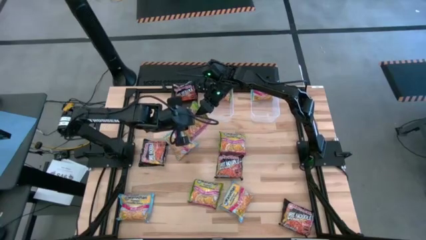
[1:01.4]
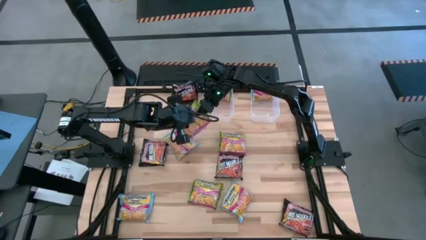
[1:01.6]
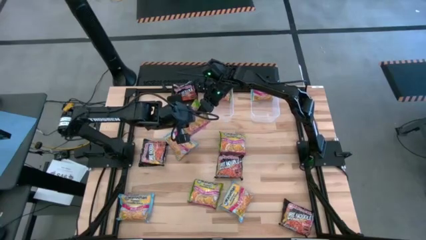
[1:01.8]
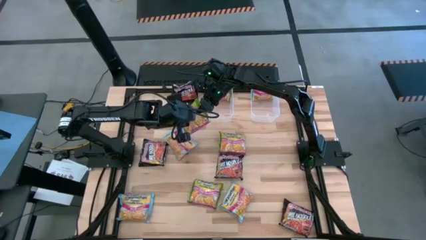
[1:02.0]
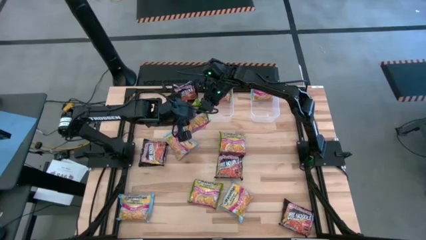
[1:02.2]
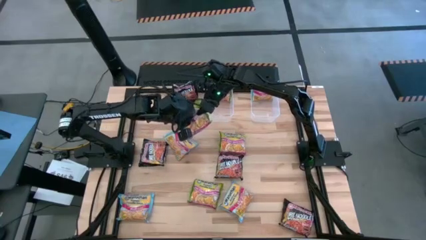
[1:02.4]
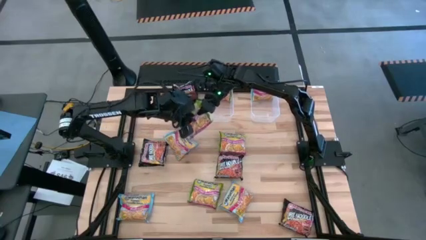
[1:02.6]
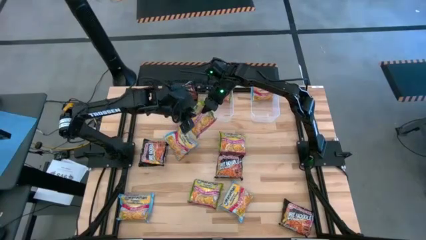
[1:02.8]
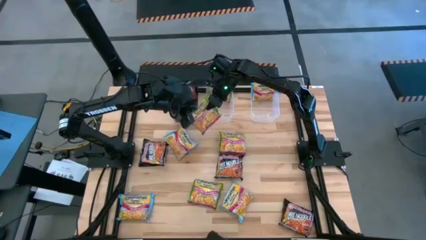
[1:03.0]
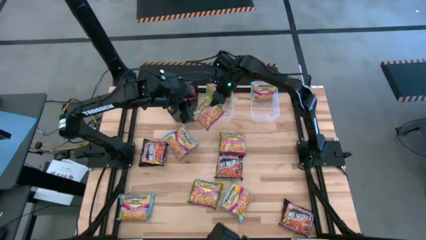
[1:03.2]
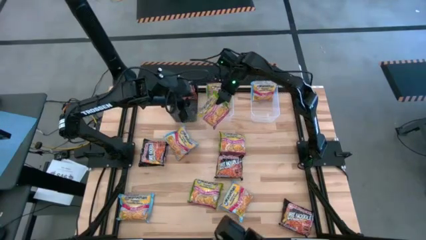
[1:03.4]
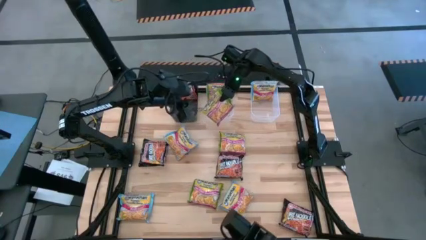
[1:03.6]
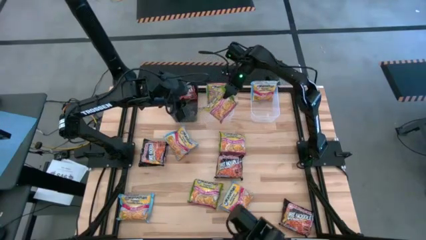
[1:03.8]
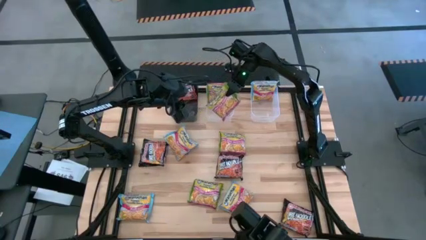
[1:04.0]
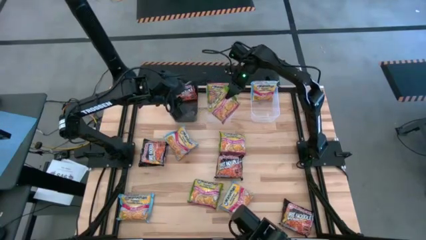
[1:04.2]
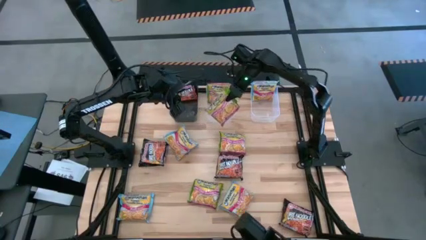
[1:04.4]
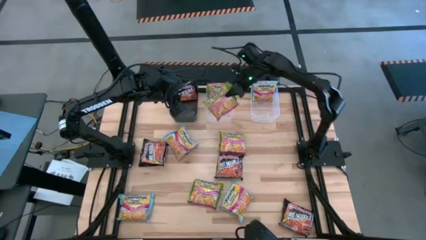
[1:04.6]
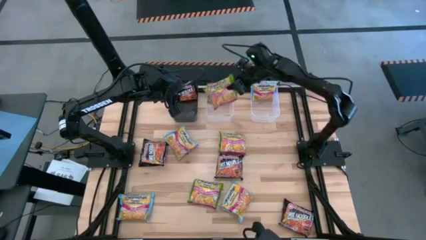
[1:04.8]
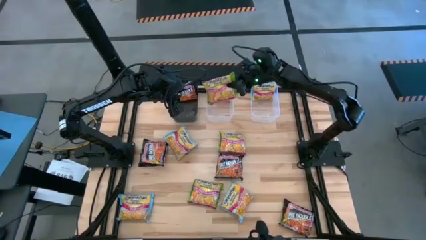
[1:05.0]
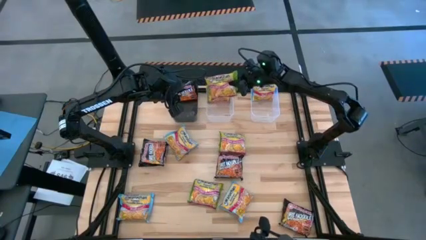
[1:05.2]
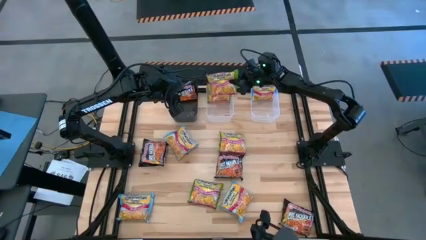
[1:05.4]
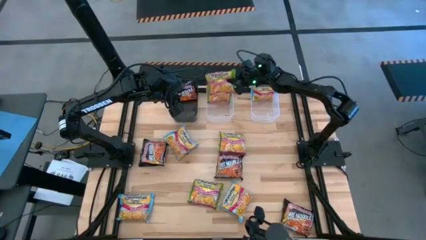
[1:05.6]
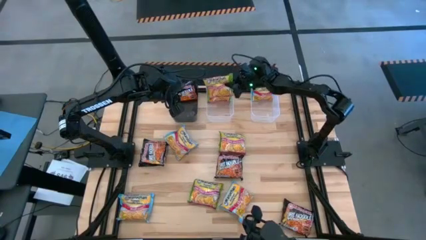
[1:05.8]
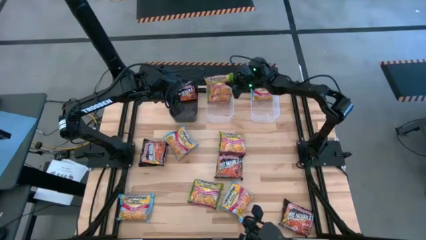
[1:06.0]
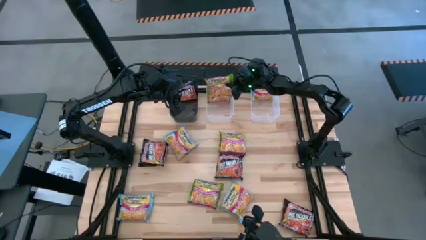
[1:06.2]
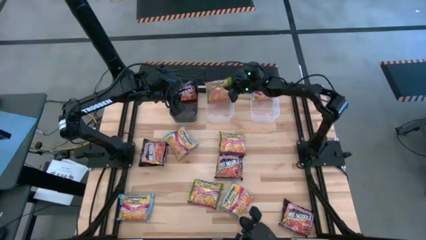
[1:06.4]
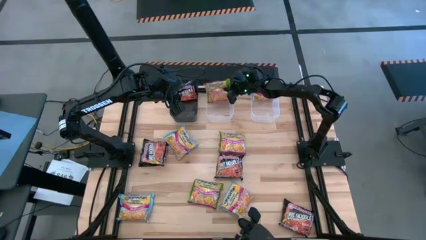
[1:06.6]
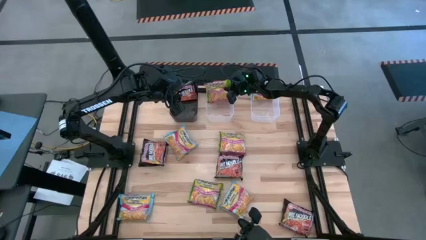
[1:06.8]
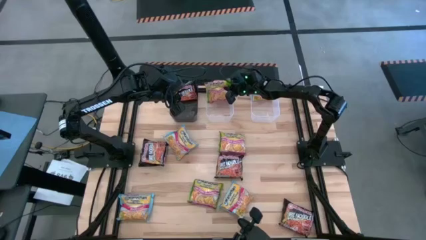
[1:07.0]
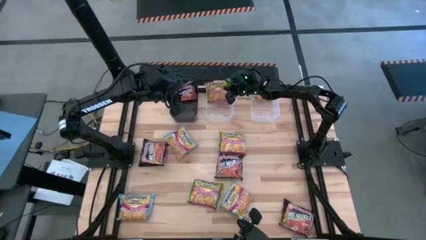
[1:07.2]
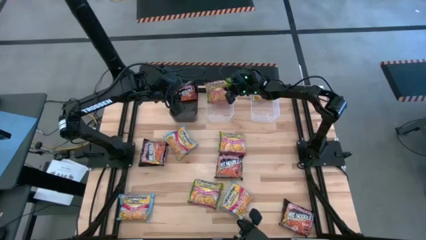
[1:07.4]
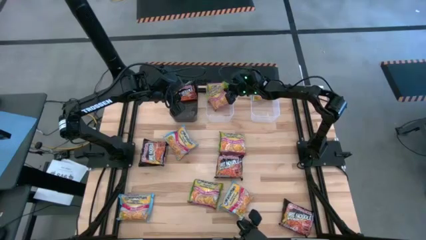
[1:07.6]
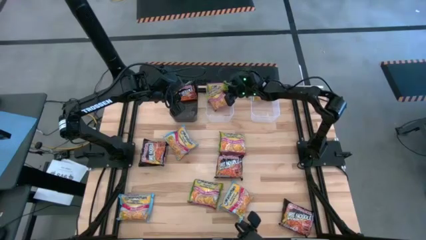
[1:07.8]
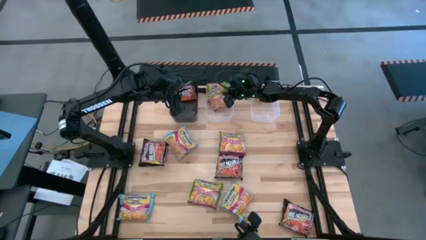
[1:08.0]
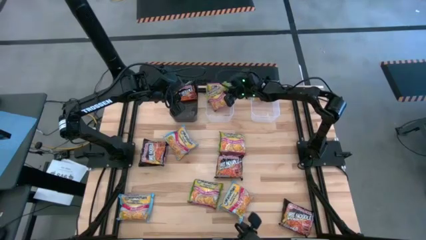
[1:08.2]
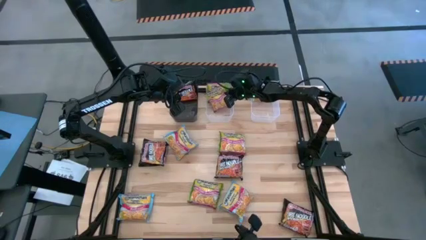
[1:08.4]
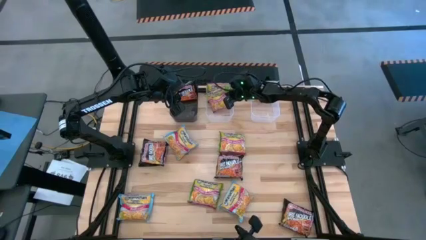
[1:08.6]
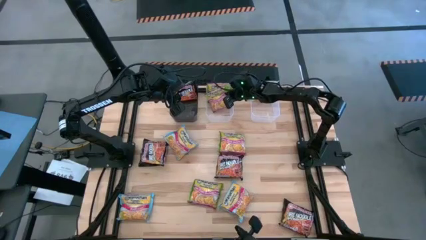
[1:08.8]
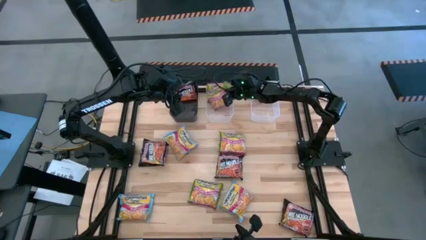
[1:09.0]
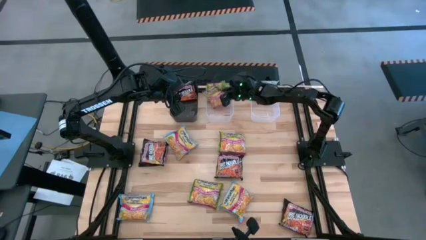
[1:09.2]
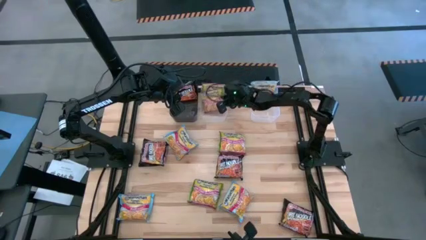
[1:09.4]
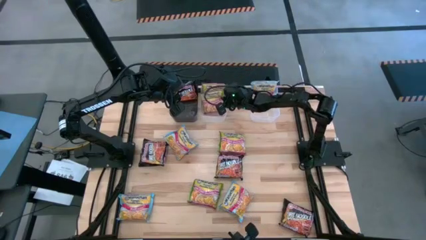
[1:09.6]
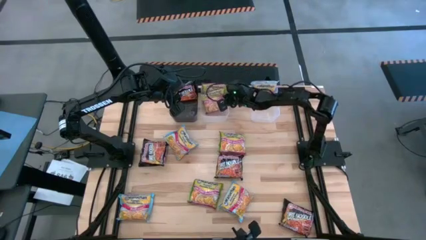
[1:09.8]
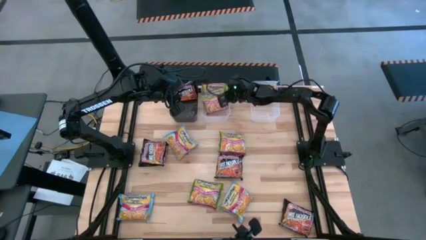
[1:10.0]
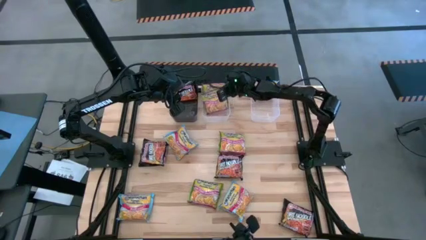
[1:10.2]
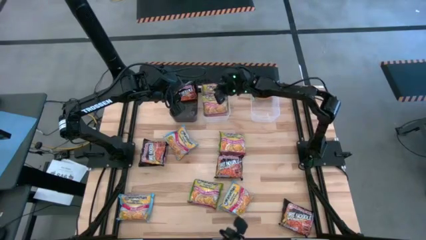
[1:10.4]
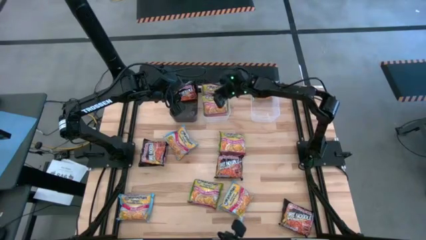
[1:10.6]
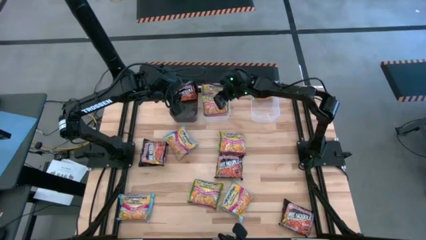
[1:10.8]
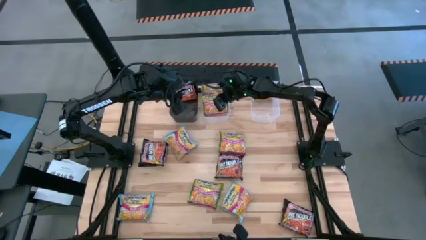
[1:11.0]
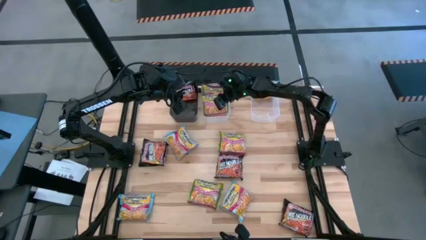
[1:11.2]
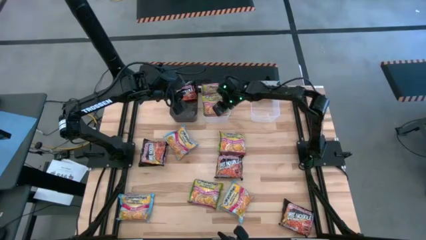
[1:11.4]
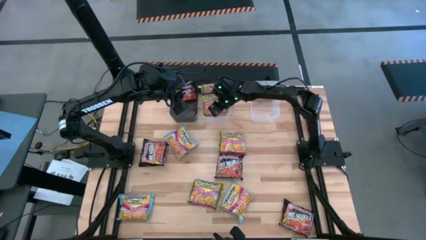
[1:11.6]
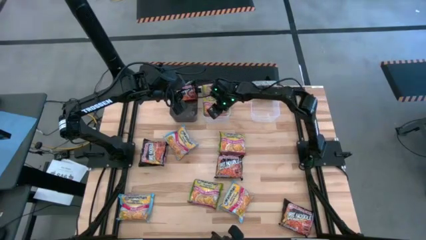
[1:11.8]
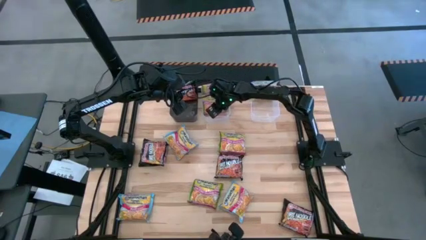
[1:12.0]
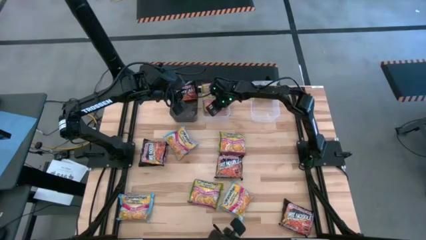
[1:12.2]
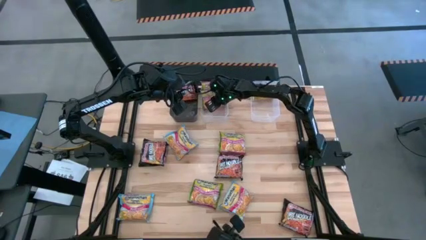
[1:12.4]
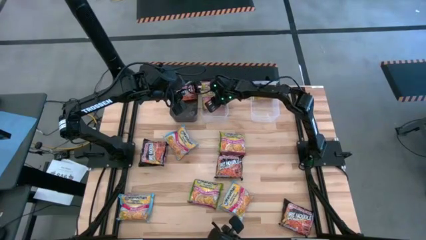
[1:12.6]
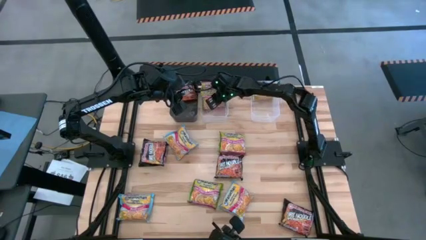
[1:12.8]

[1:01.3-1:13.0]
Task: Sort Maruchan noodles
Put the green noodle pack into the left transparent bin

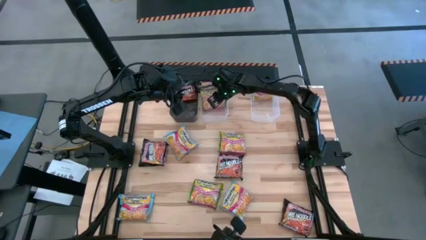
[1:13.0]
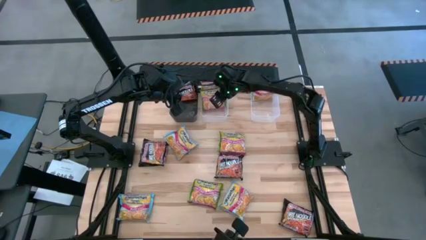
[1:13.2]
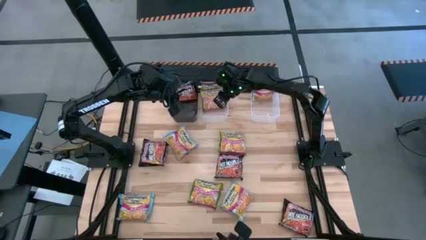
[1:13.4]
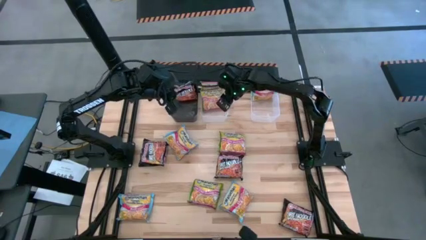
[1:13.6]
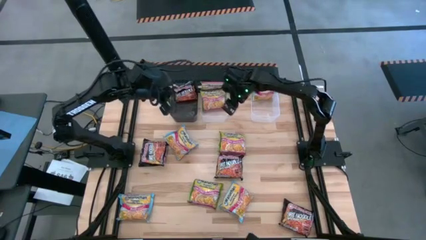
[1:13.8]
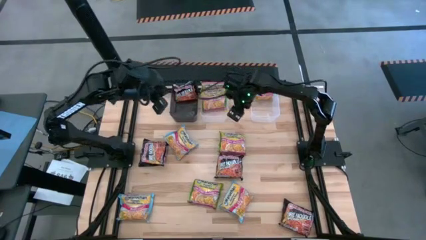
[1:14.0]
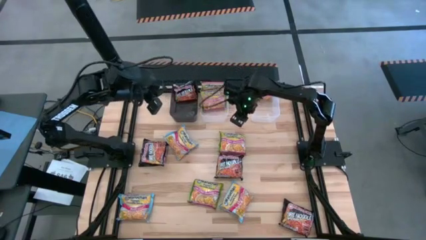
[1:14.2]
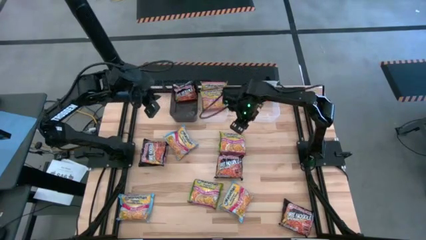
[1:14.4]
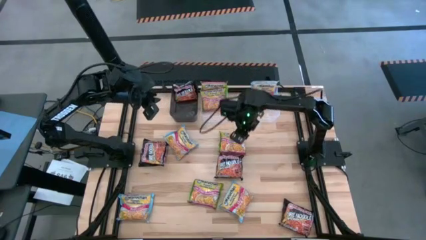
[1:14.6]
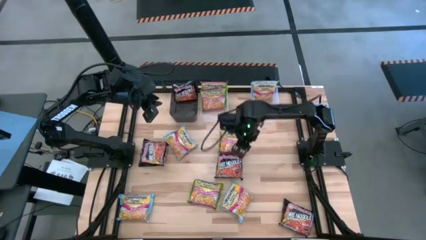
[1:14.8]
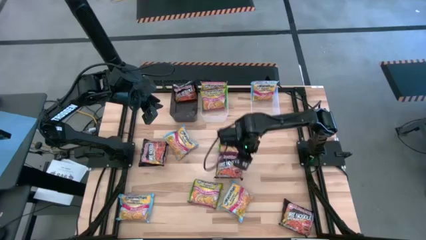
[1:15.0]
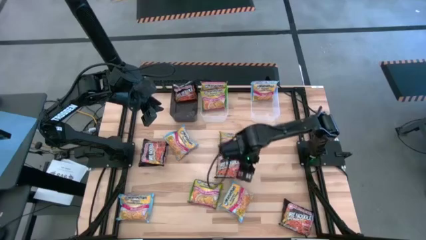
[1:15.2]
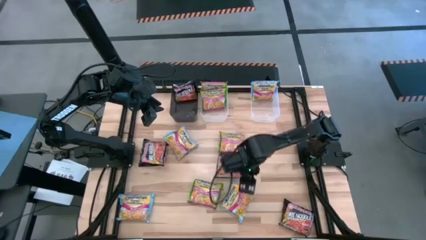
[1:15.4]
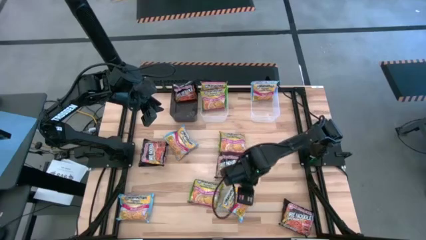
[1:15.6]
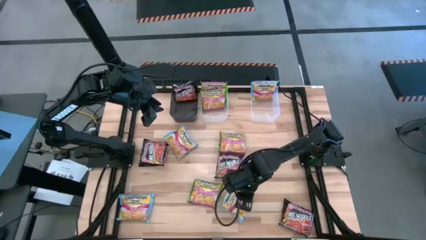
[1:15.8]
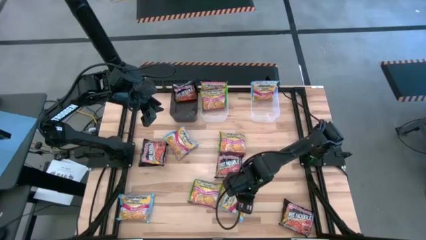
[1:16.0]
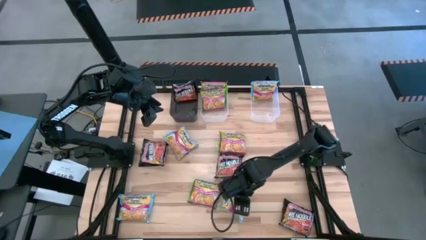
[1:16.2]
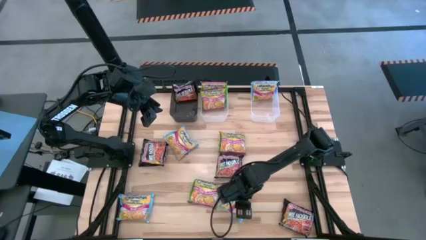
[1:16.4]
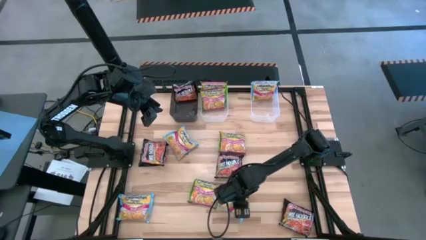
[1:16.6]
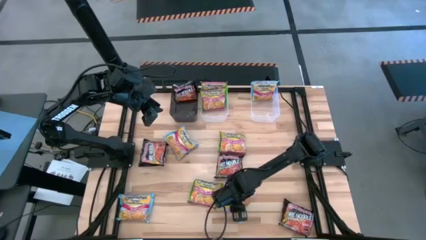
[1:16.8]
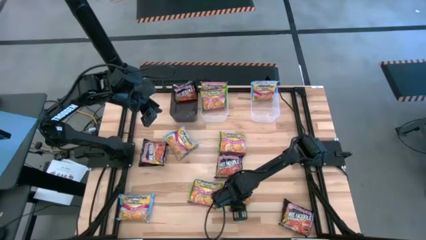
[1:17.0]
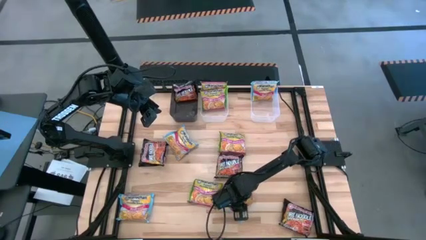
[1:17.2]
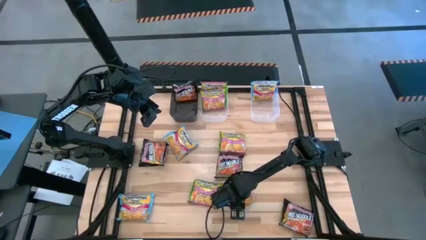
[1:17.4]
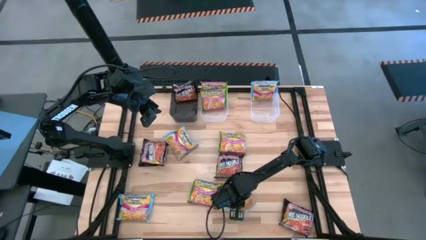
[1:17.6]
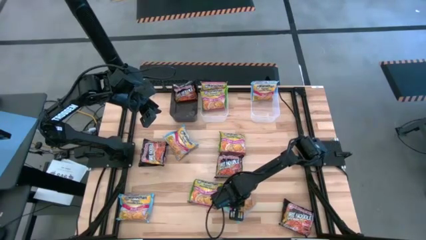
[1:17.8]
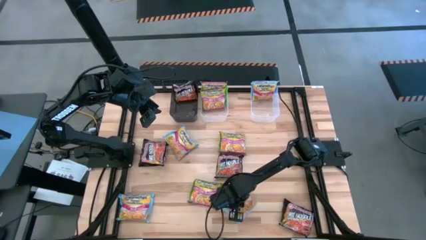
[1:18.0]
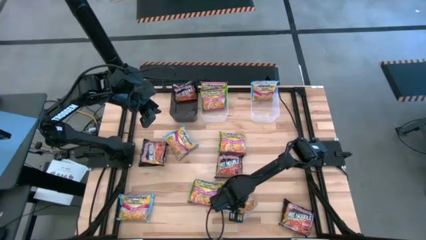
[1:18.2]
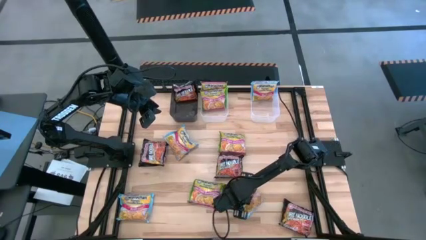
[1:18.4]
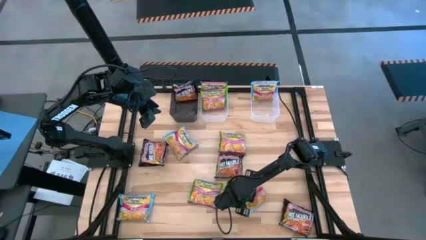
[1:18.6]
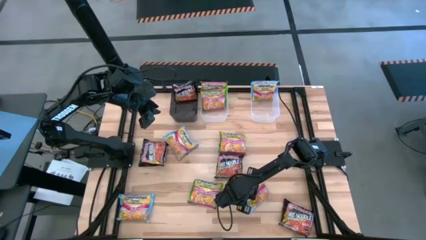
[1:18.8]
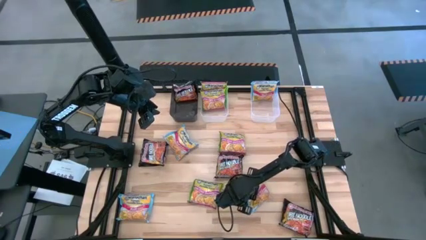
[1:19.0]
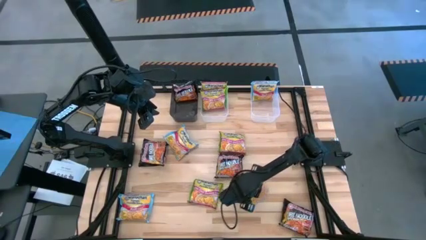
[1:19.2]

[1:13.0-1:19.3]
Put the blue noodle pack into the right transparent bin
